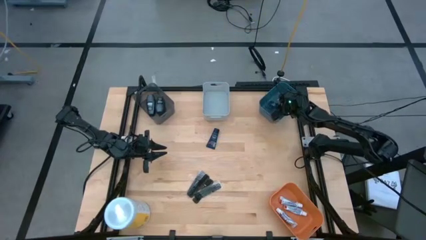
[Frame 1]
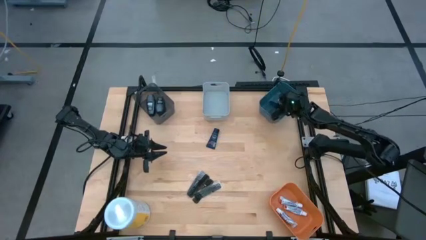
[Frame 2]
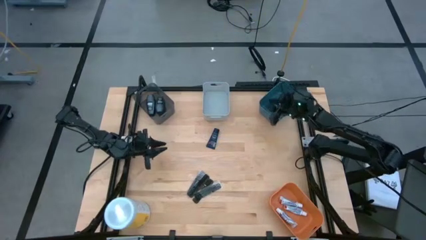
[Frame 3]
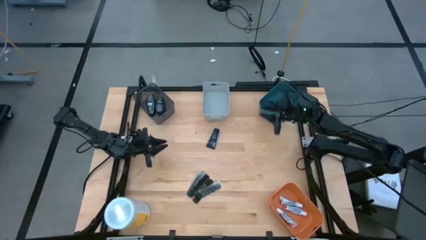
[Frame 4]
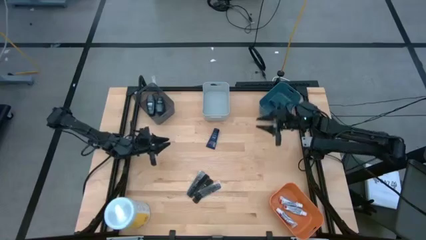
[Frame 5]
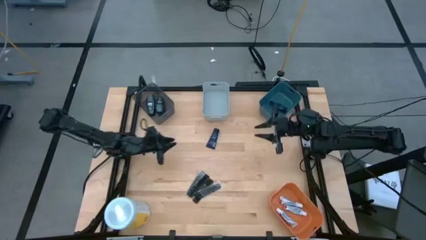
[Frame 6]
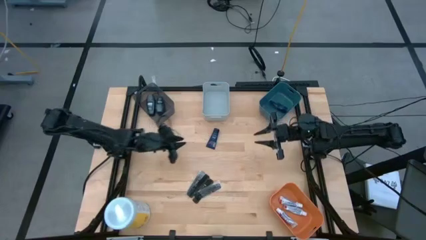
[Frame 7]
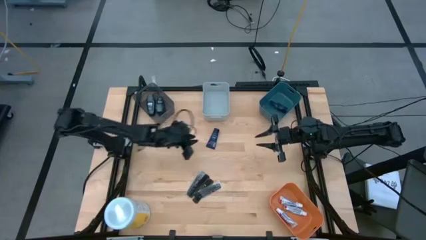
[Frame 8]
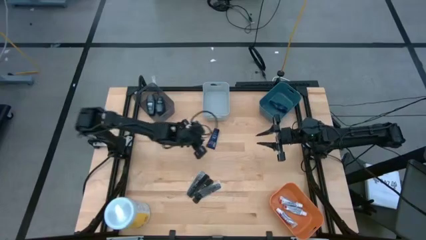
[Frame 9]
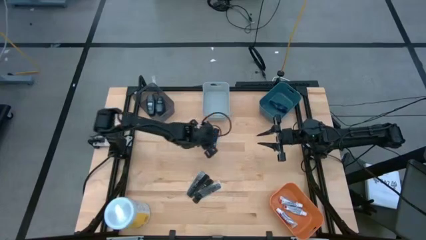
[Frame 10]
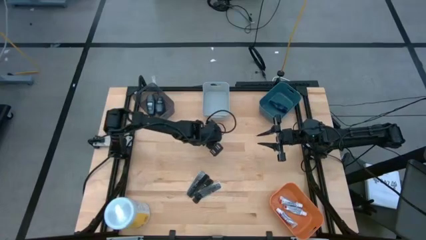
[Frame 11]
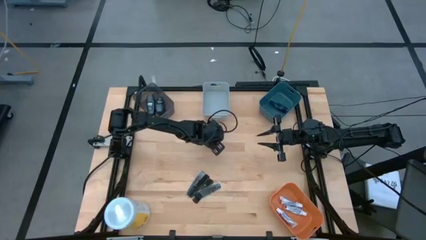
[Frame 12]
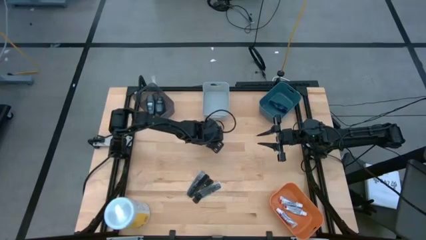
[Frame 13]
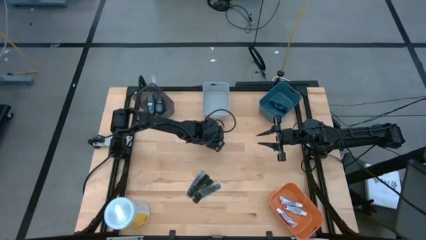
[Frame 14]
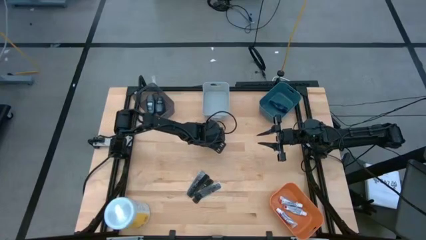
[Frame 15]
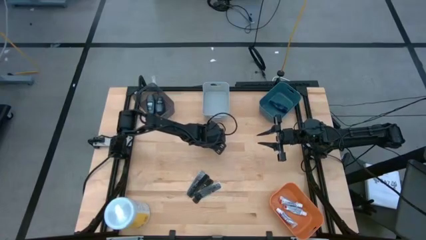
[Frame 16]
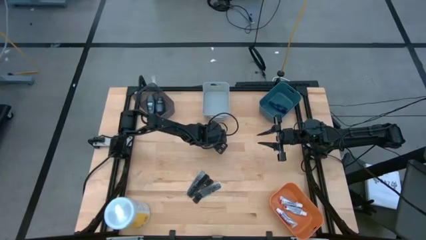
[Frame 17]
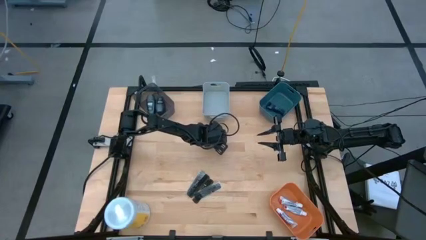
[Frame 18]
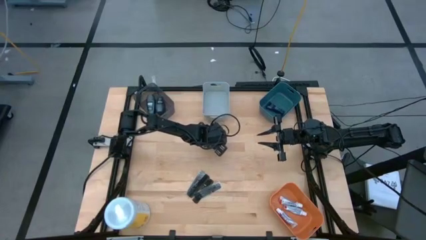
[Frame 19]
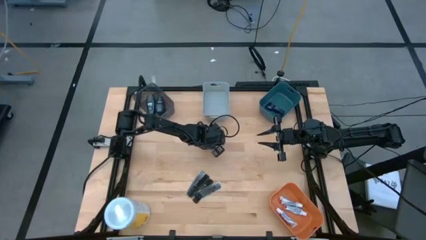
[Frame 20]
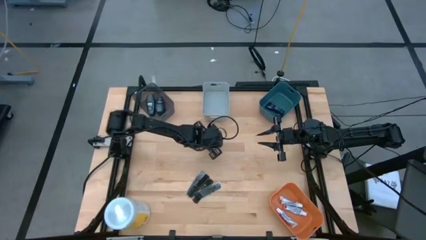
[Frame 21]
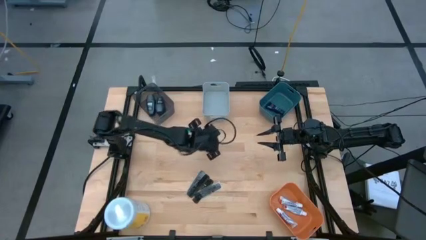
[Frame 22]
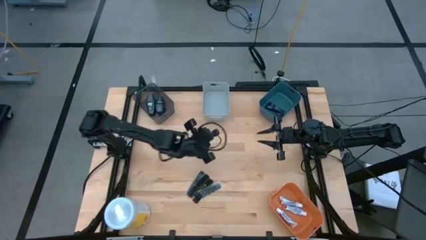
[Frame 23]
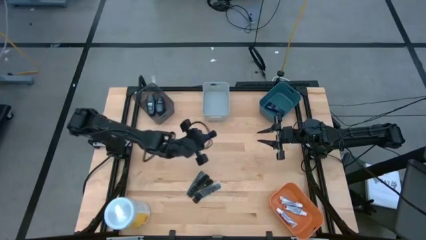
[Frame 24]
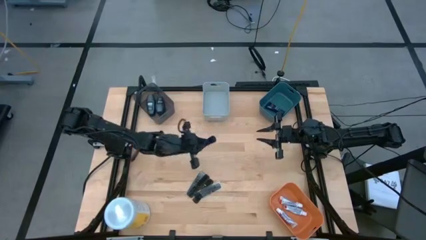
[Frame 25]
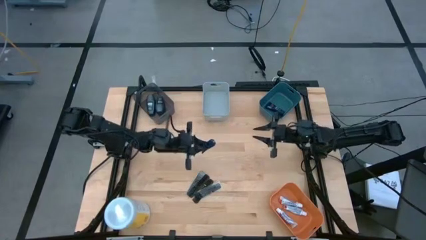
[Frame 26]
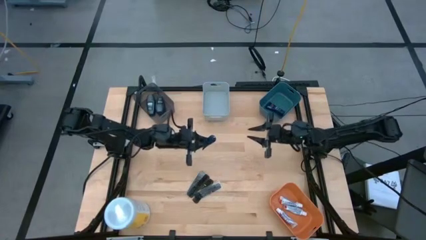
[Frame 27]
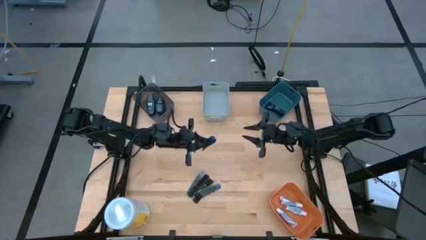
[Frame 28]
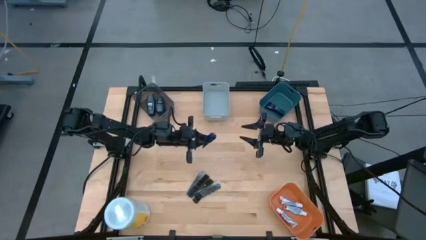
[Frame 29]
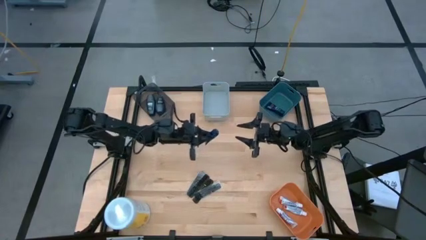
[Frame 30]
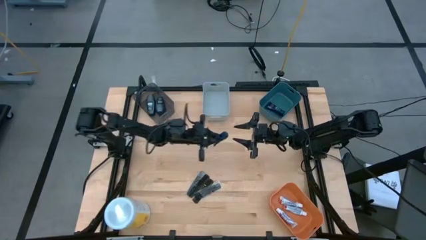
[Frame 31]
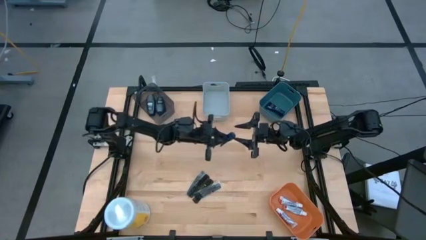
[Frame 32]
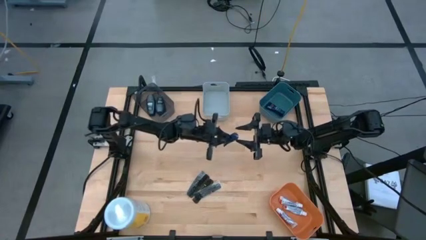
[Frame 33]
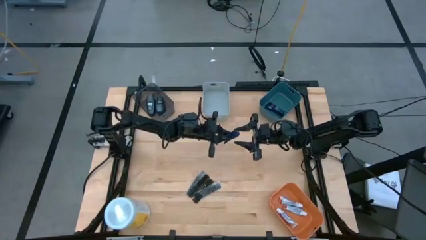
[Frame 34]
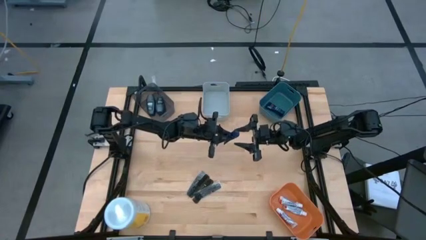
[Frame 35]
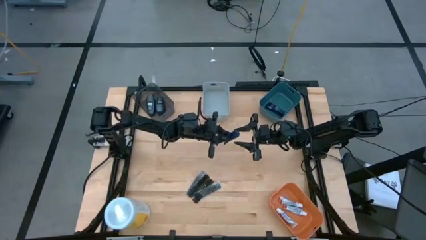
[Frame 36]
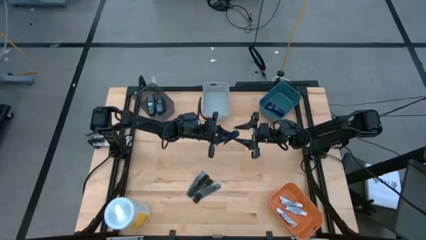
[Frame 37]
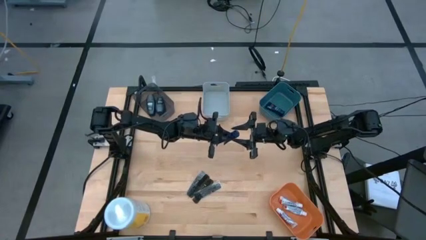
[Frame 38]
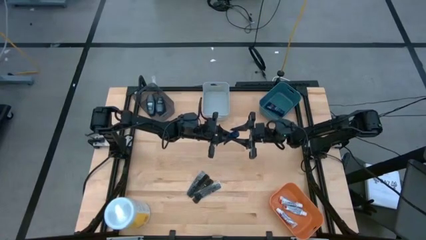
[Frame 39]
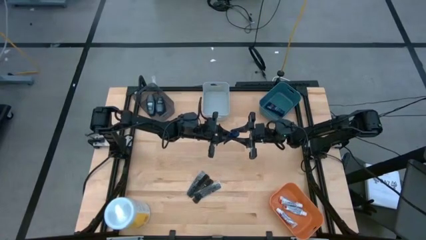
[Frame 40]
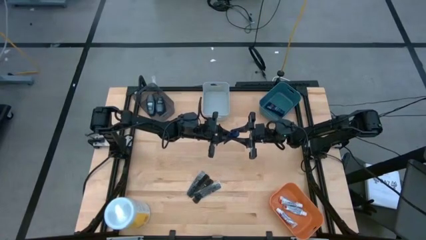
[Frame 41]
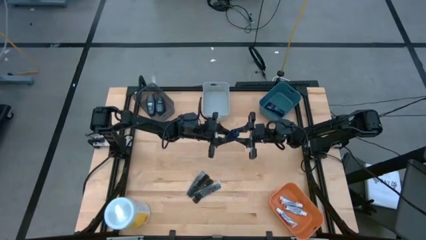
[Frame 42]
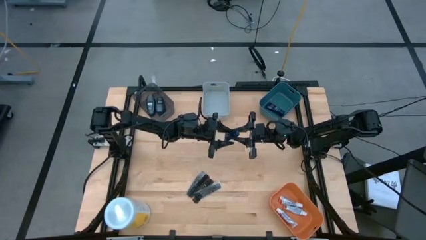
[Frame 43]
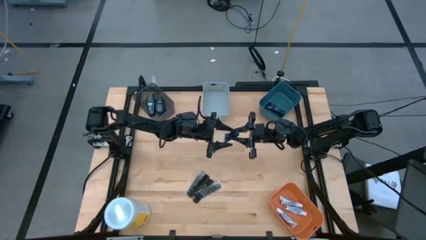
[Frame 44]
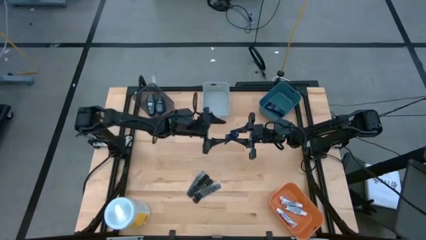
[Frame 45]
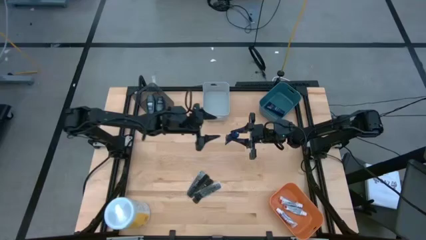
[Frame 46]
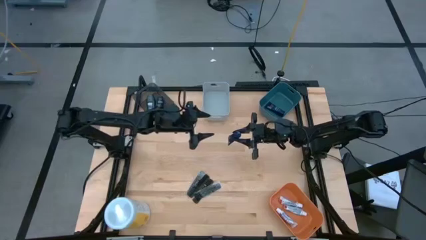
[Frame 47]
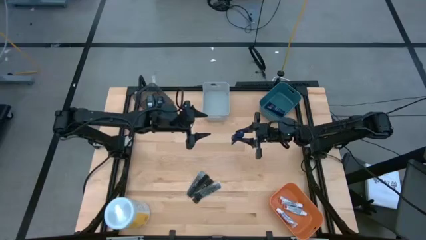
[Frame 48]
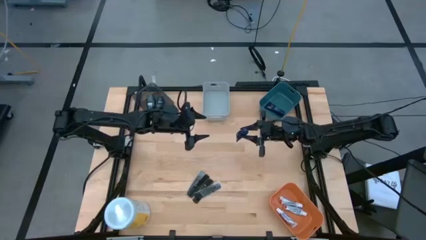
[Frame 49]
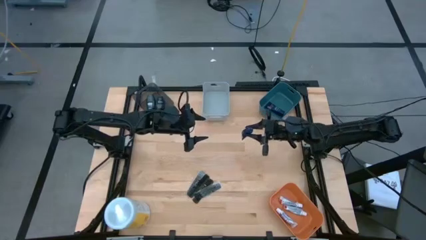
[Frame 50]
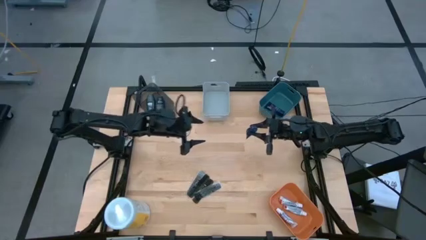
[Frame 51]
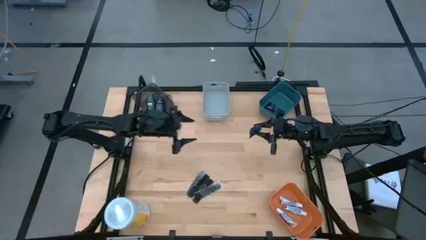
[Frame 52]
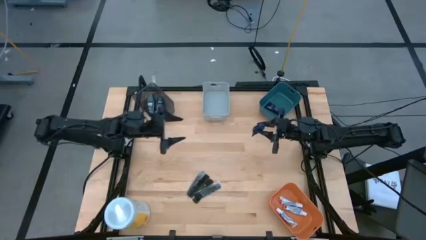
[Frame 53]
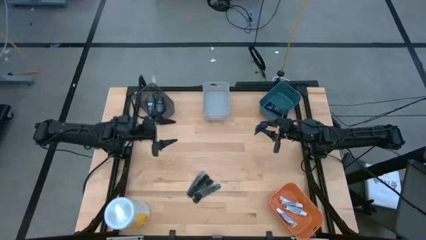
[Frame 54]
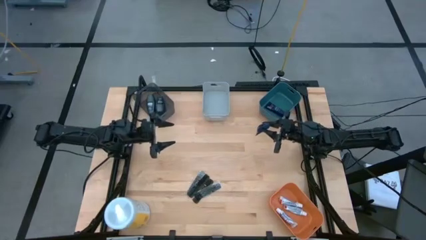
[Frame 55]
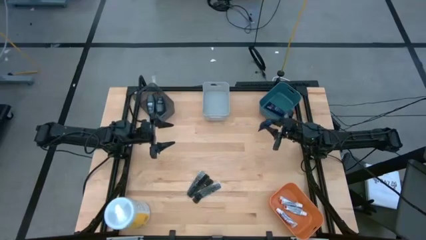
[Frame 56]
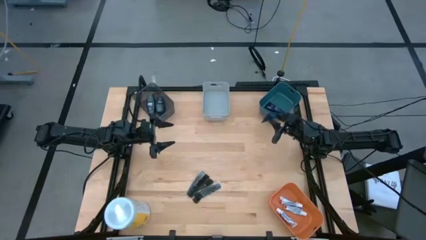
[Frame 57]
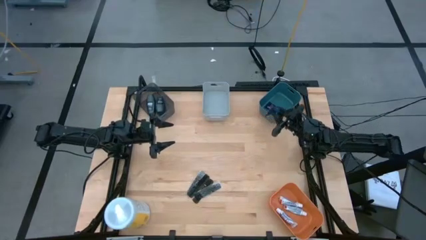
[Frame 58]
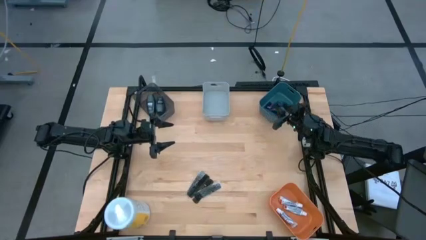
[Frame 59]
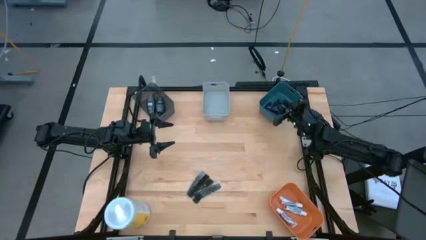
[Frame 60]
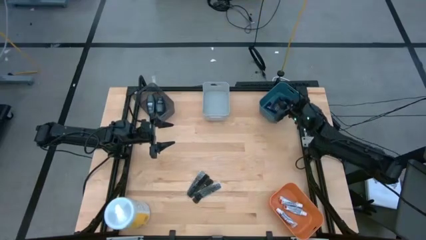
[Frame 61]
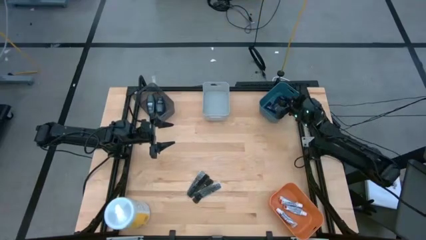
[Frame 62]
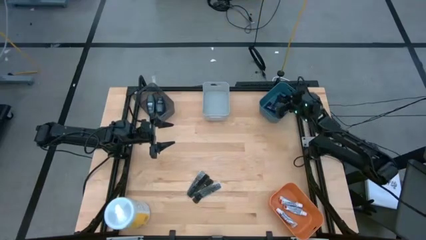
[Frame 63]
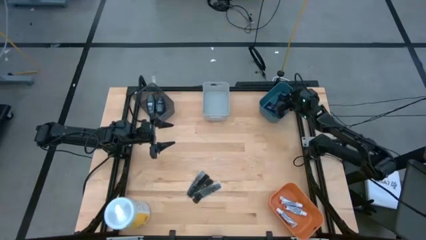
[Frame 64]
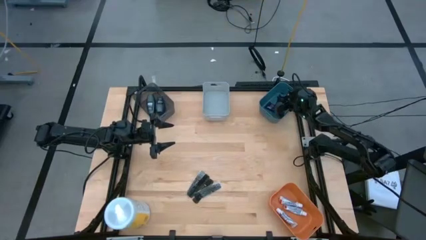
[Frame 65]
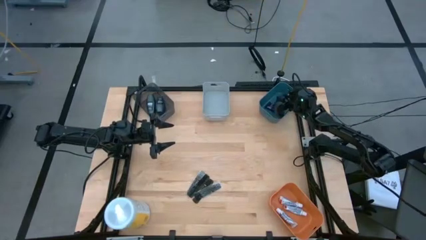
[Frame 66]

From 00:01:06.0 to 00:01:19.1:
Task: Pick & Place Travel size toiletries
Put the right blue shaving cream into the blue bin

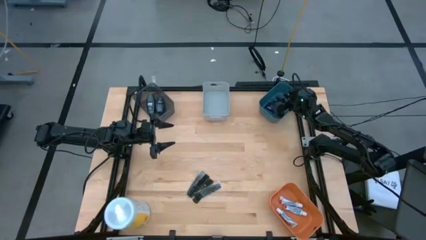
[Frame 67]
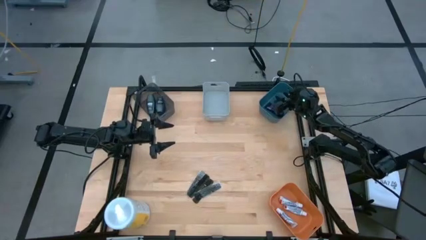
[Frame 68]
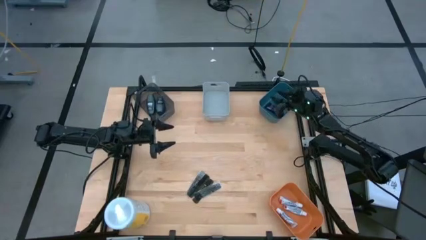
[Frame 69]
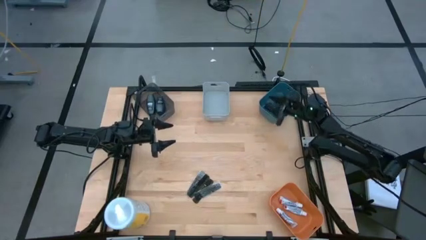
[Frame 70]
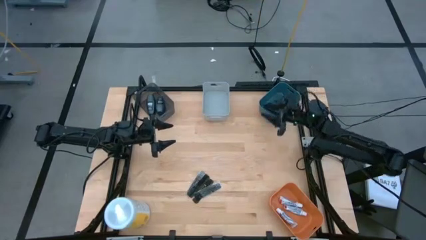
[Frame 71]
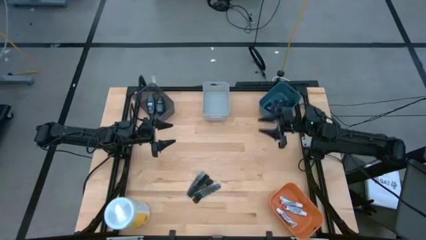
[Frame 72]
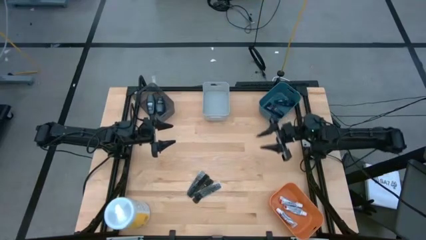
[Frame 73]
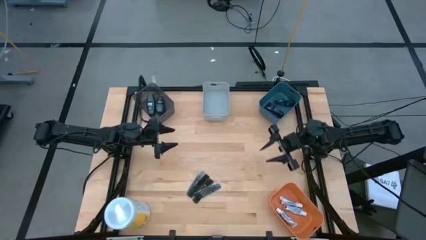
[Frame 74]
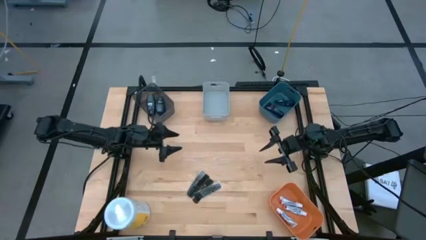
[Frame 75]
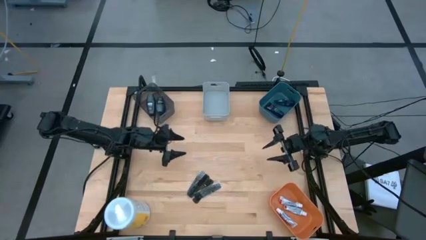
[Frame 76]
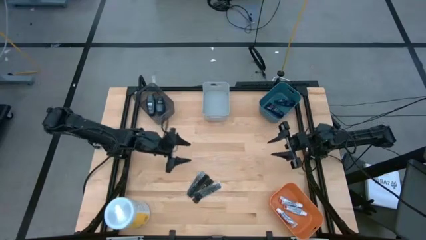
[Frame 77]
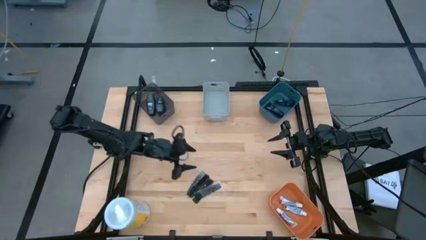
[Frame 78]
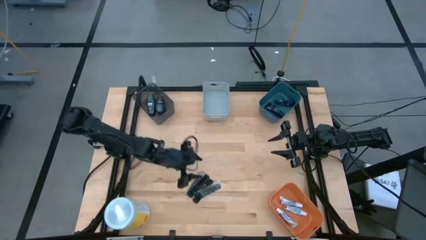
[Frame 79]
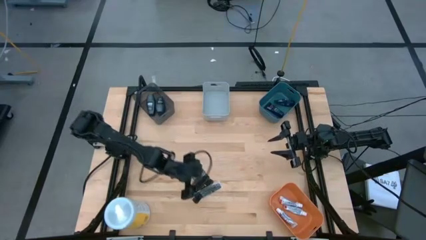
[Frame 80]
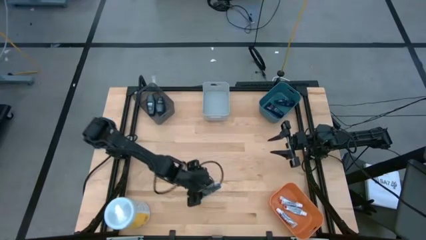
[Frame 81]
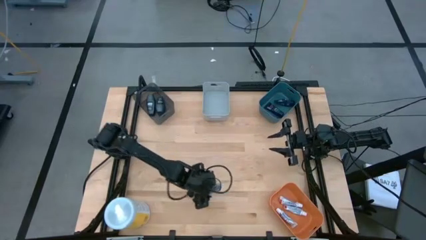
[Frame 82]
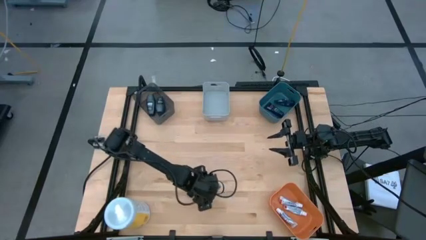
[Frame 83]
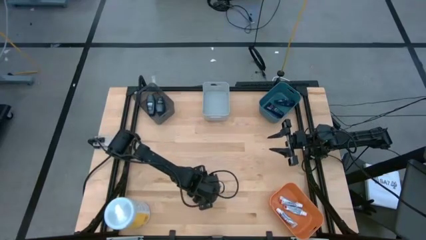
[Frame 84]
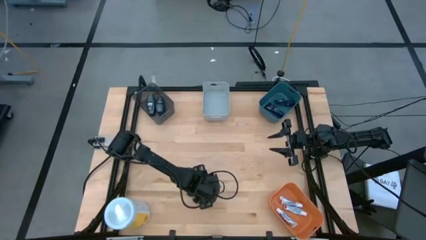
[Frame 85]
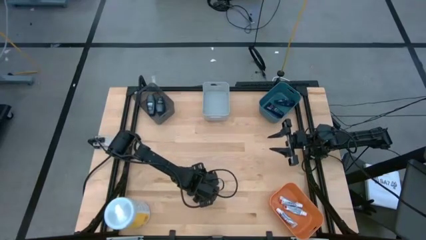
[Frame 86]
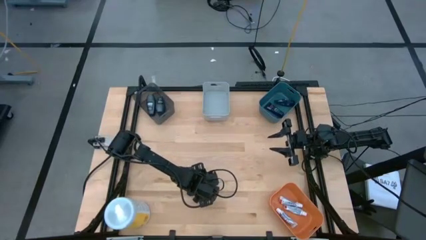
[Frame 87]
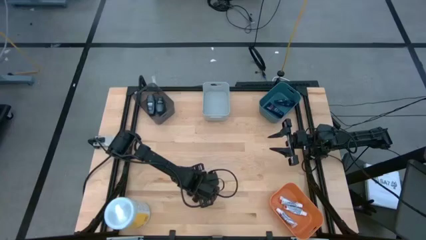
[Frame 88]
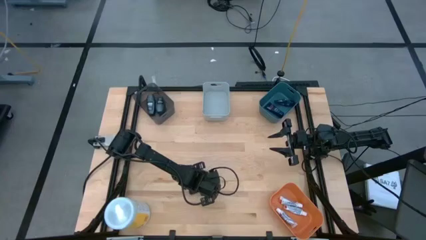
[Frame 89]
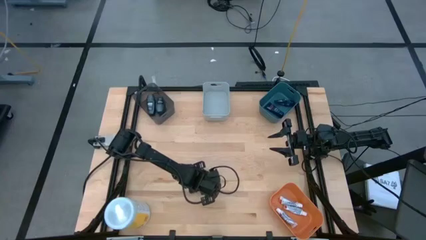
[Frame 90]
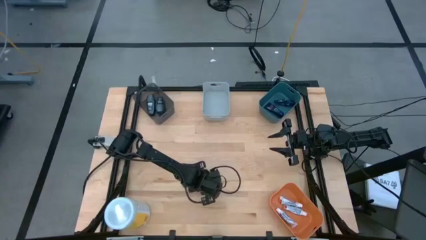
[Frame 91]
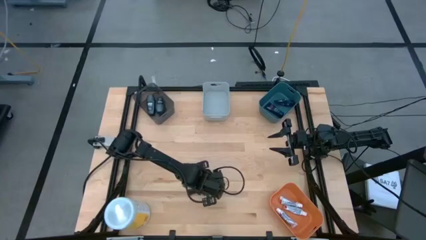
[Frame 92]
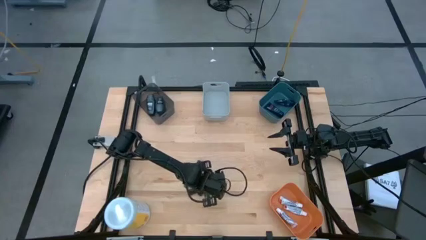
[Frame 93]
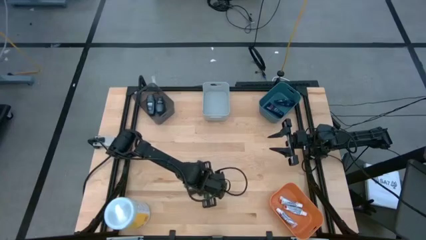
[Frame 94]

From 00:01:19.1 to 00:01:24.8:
Put the black comb into the gray bin
